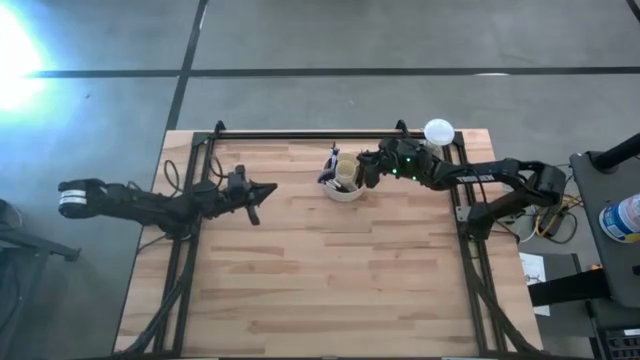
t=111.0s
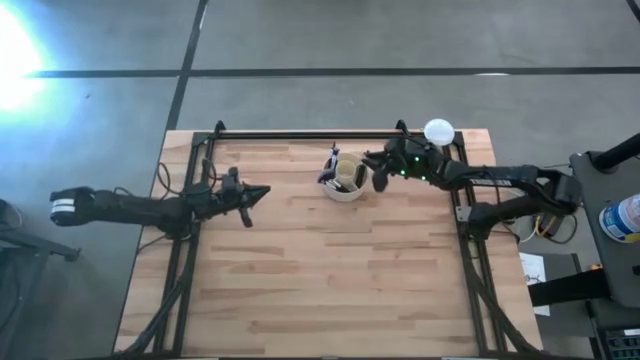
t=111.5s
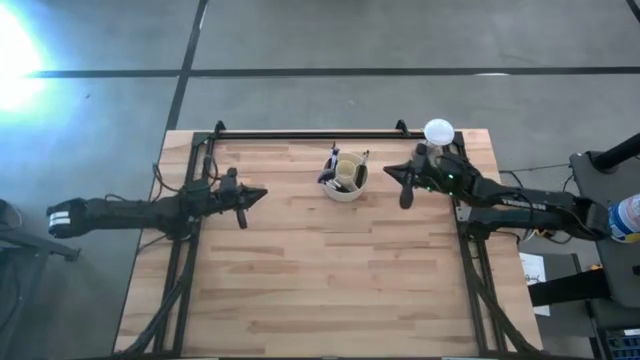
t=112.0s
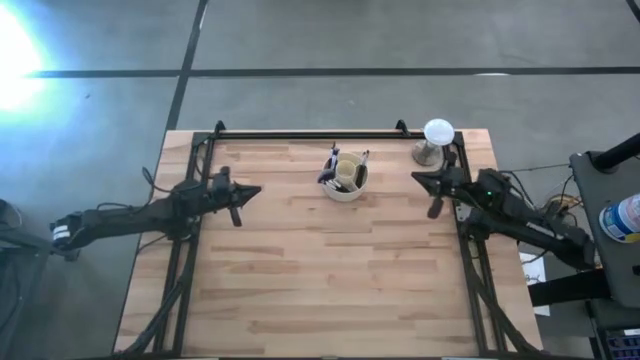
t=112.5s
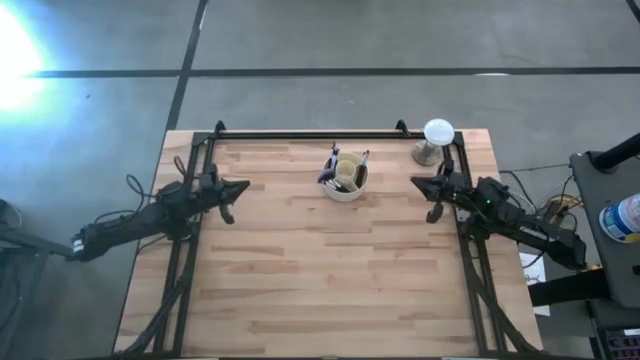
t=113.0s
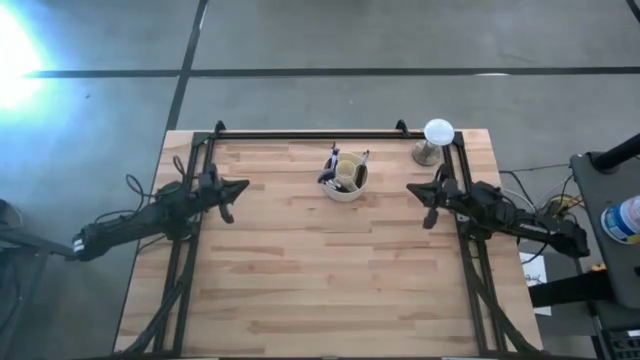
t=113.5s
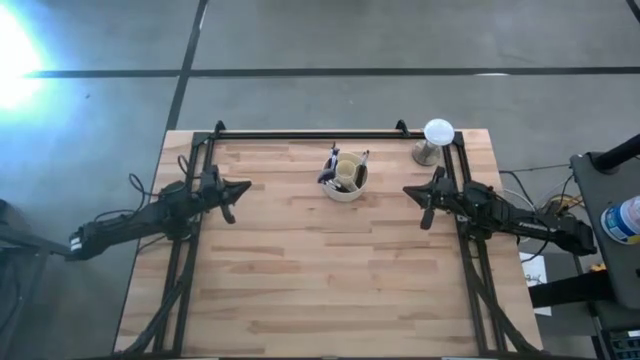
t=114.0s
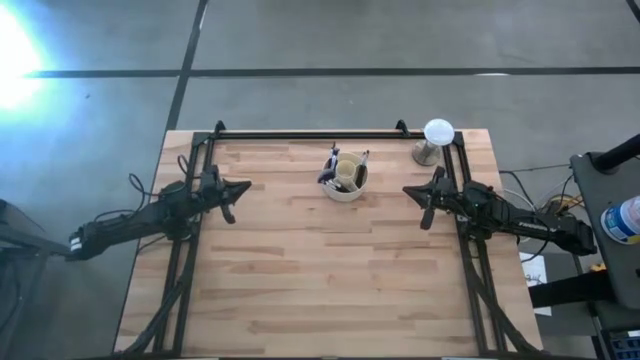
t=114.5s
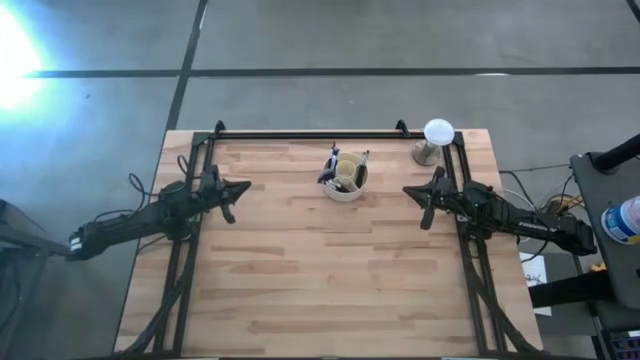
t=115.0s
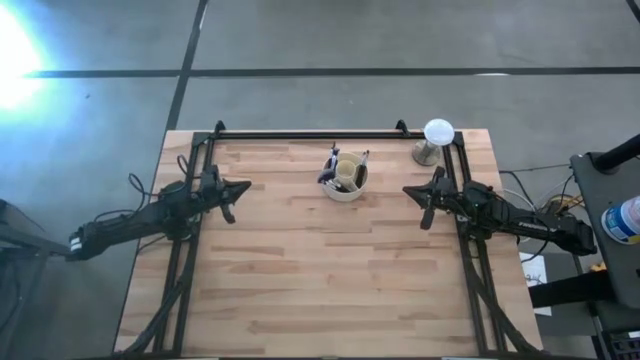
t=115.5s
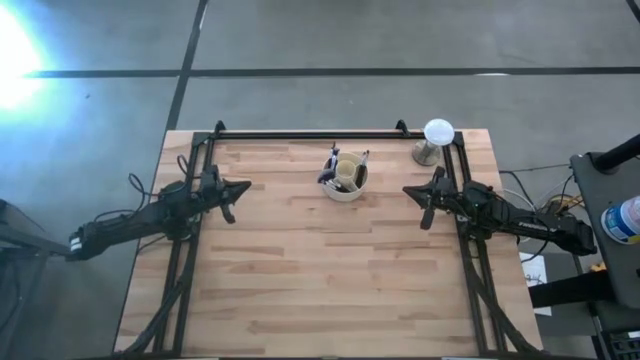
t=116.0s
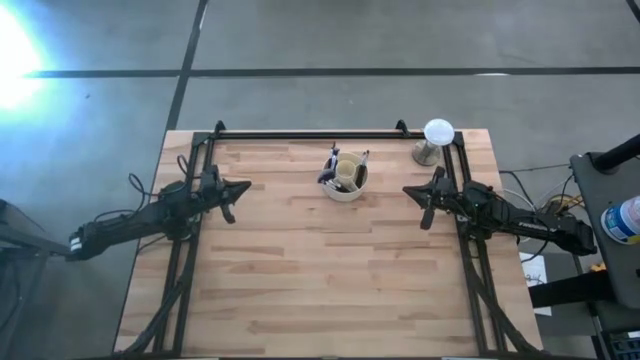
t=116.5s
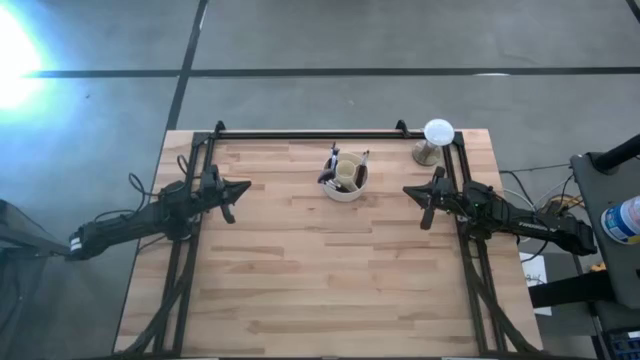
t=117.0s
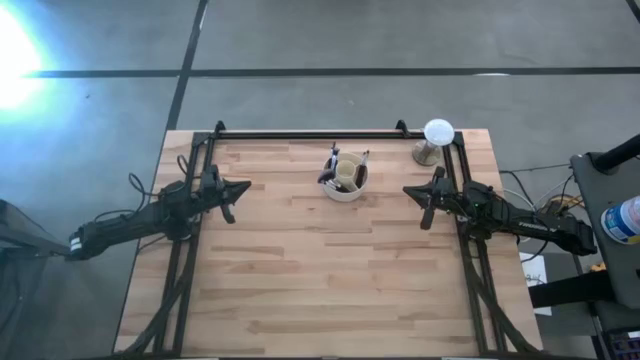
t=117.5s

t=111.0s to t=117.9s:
Task: Put items in baskets/containers
Return to Home Position

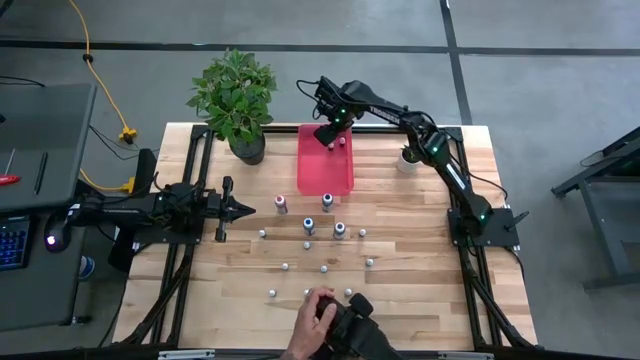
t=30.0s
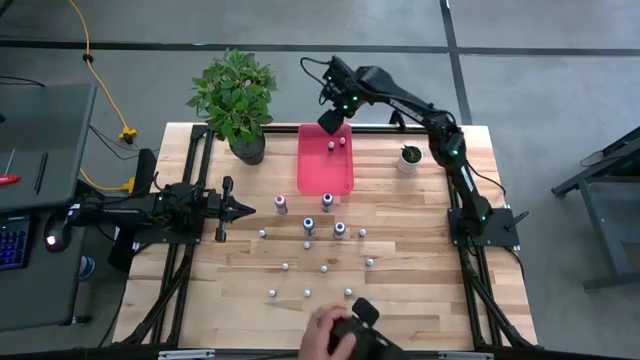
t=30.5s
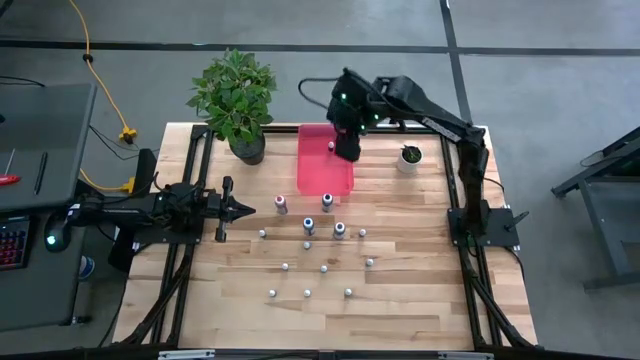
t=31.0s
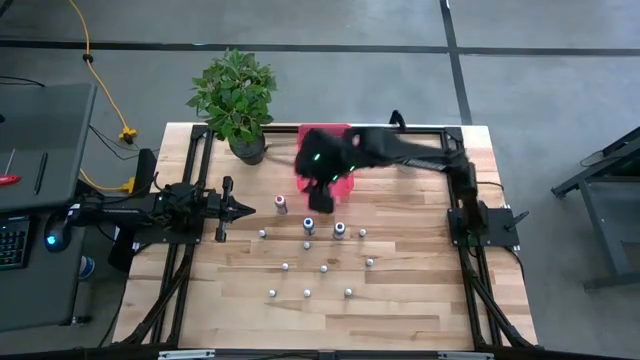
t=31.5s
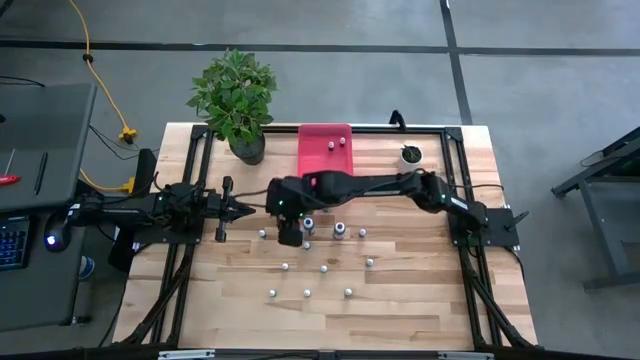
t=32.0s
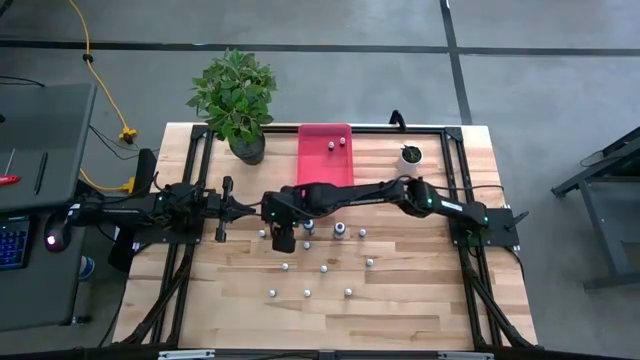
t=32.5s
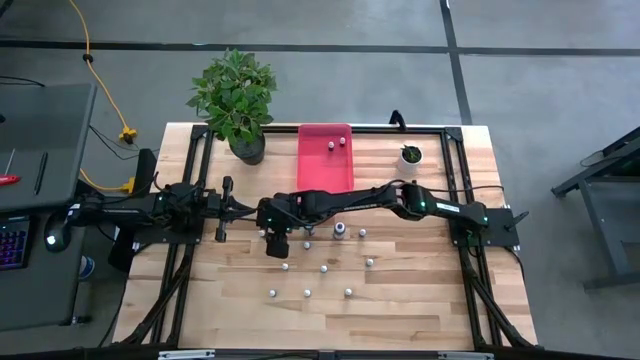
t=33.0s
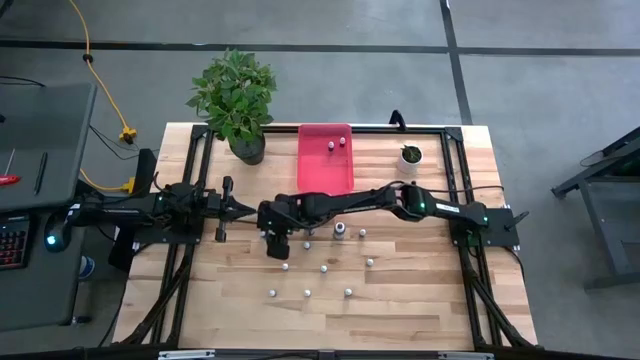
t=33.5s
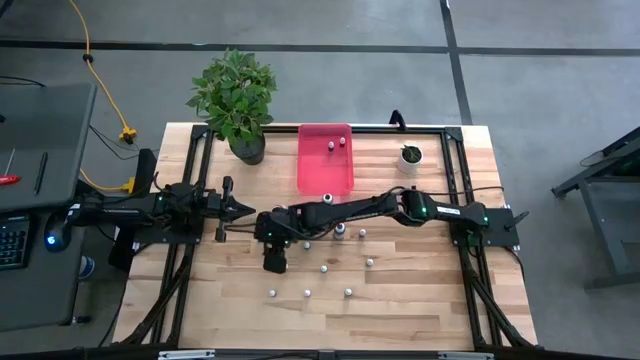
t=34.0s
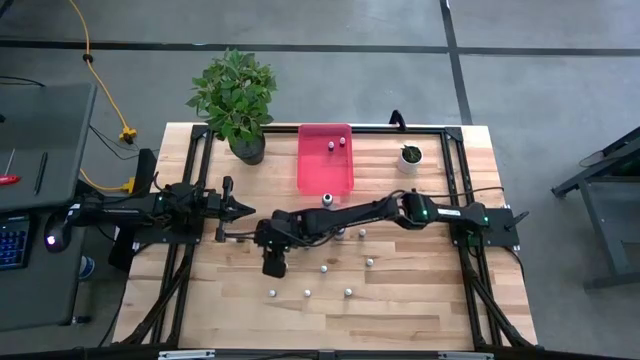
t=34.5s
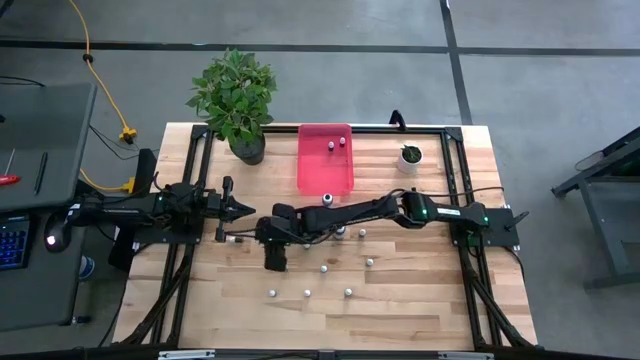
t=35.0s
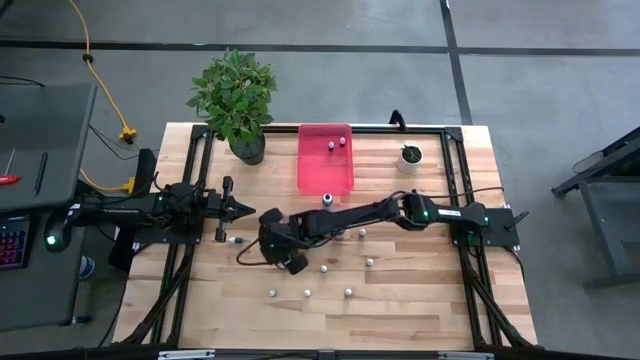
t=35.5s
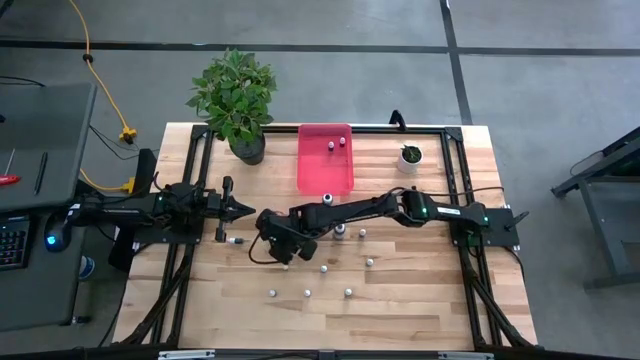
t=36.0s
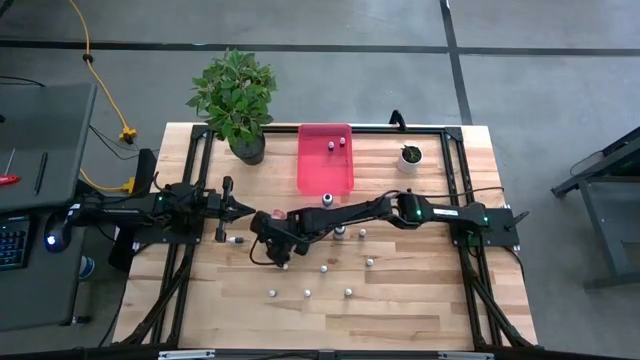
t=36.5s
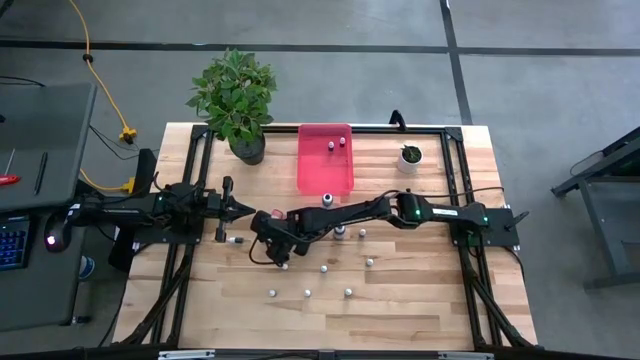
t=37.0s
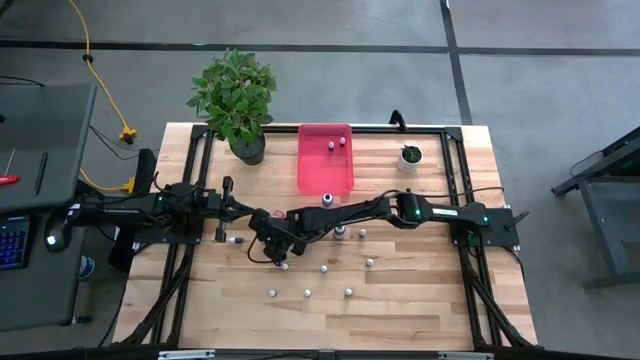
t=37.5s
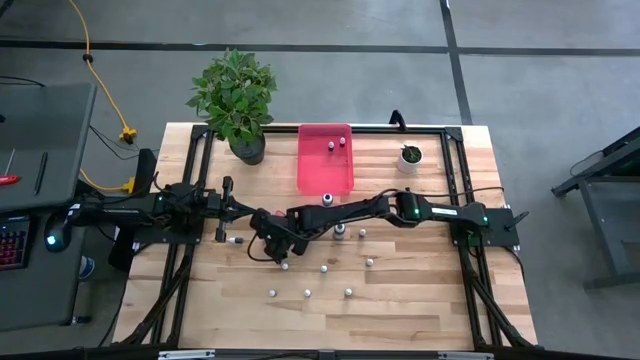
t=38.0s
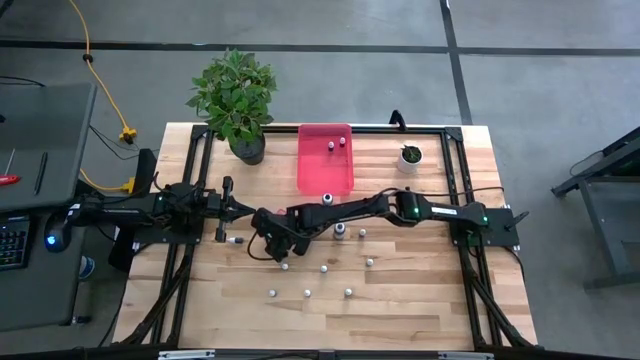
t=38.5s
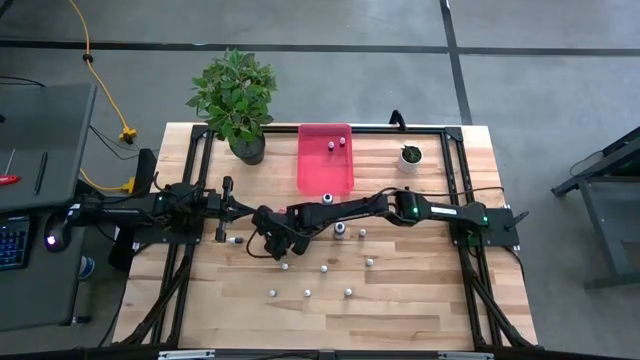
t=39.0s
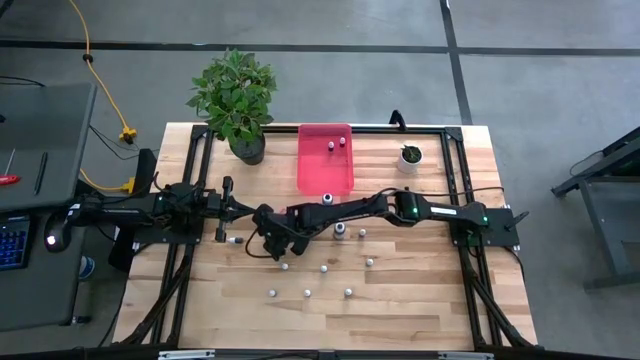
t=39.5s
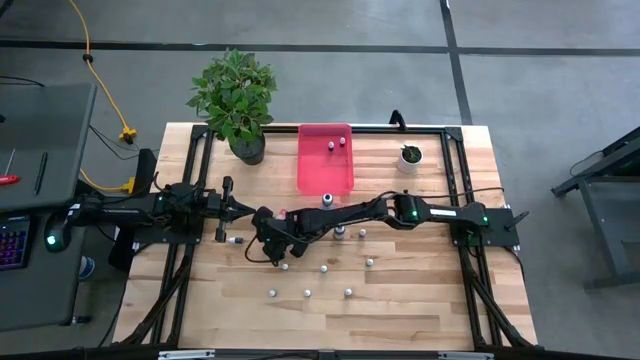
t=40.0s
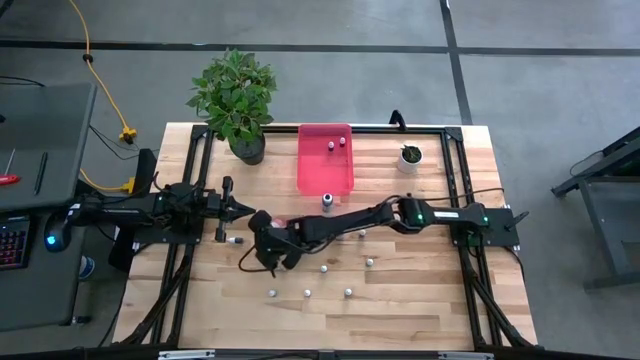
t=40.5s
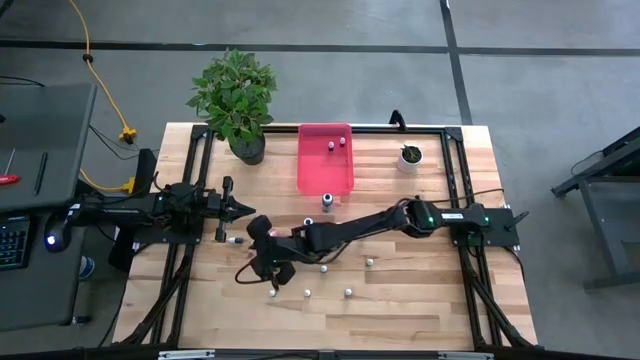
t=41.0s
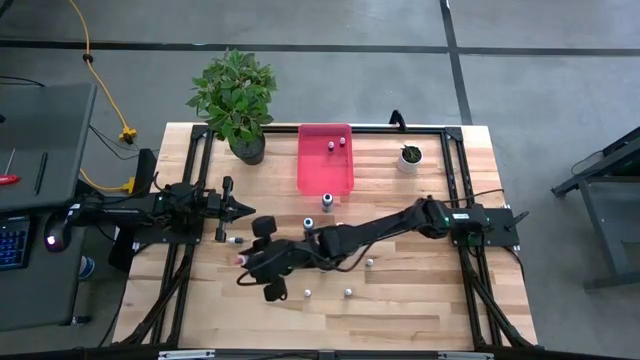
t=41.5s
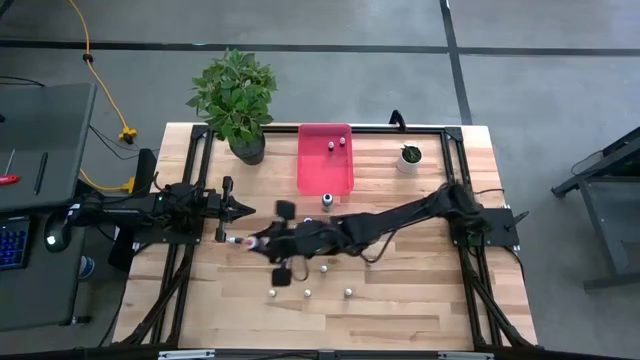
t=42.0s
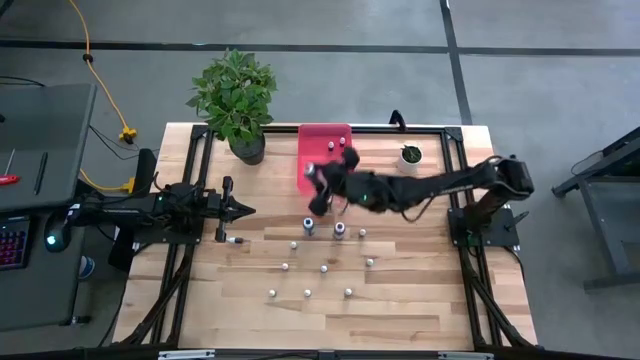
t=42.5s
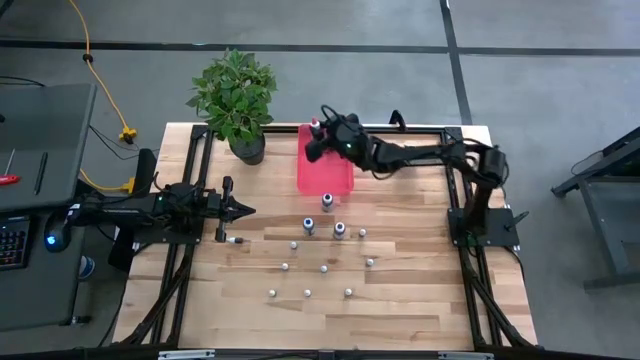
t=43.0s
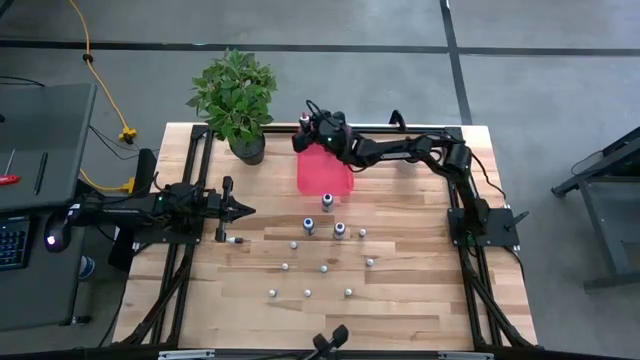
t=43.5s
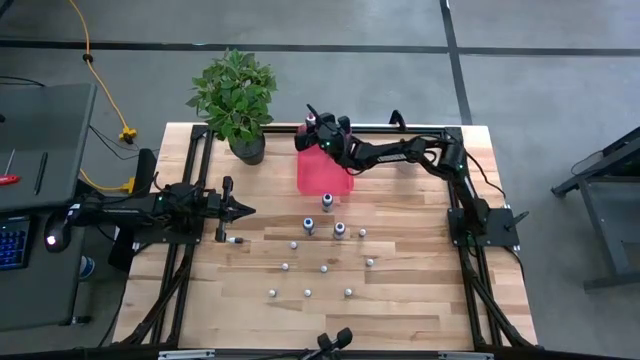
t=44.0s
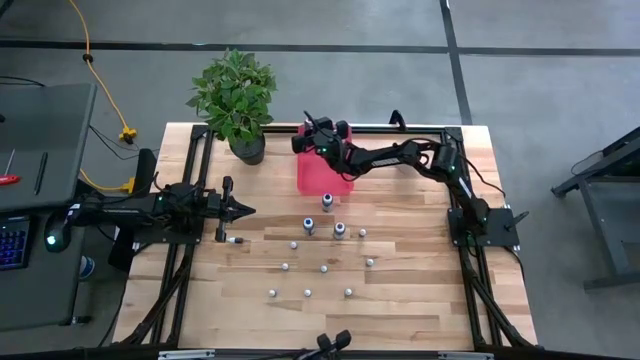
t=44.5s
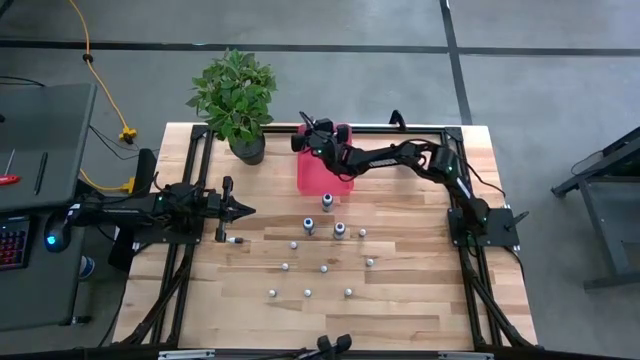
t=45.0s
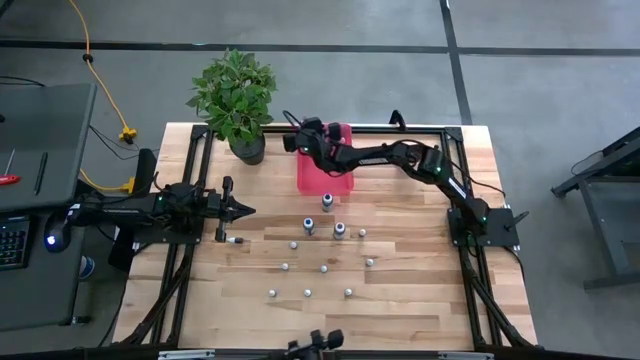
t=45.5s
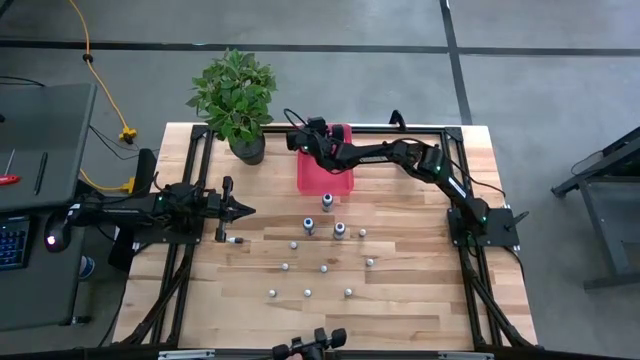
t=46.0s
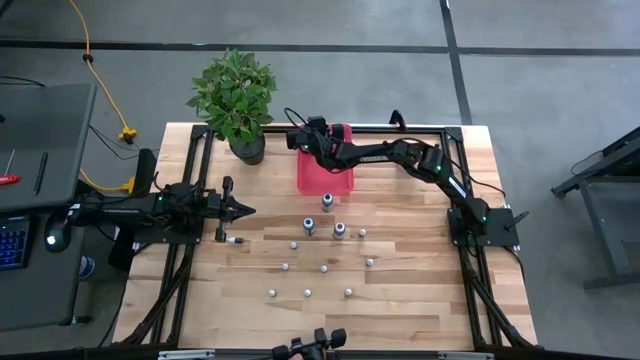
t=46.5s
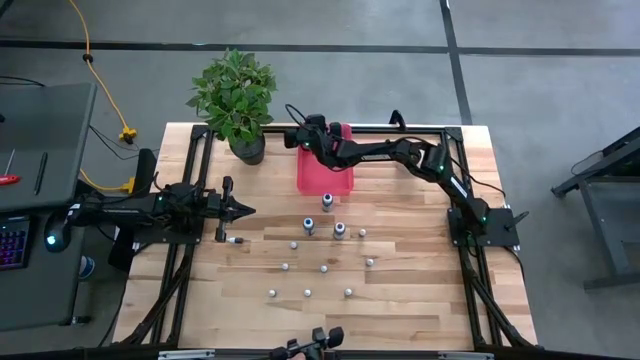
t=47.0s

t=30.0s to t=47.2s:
Task: Pick & Place food coloring
Put the pink food coloring bottle into the pink bin
